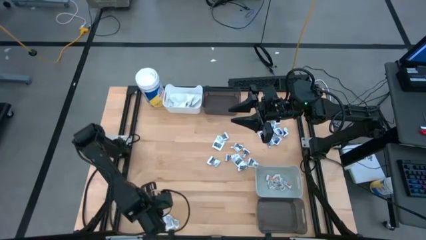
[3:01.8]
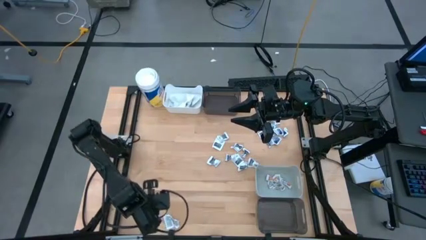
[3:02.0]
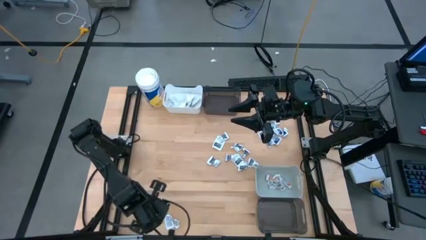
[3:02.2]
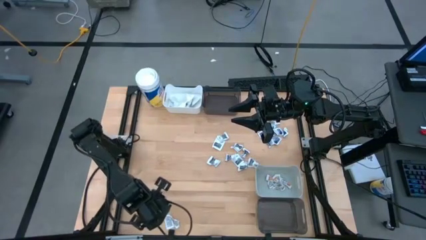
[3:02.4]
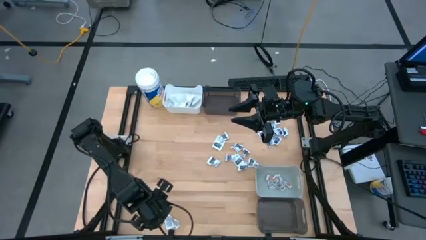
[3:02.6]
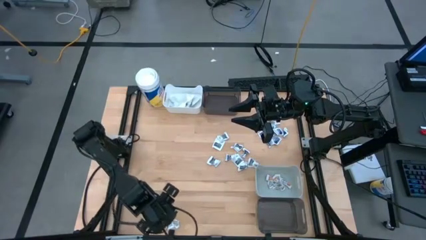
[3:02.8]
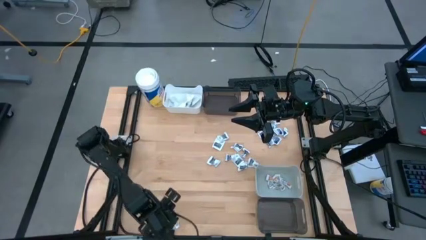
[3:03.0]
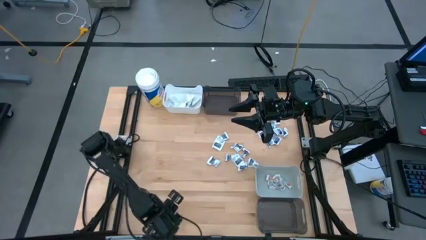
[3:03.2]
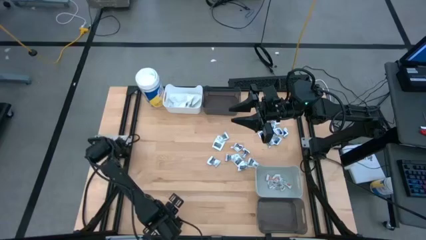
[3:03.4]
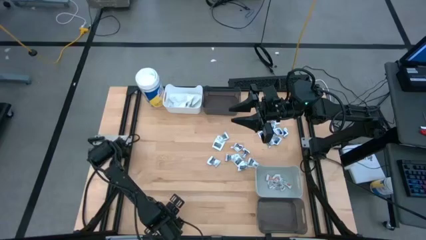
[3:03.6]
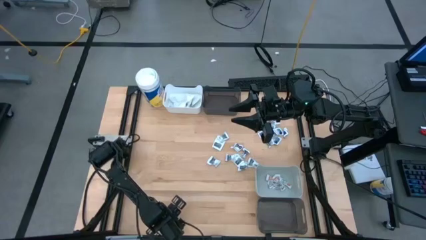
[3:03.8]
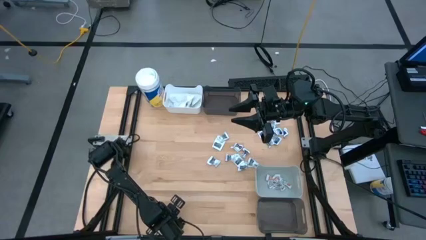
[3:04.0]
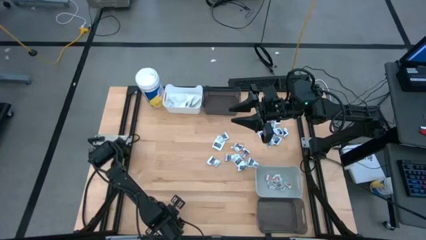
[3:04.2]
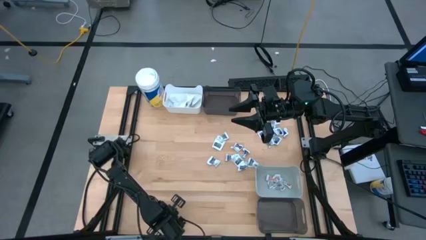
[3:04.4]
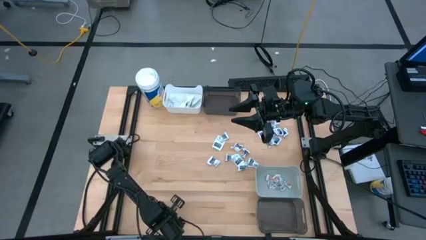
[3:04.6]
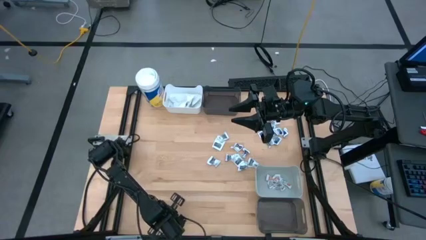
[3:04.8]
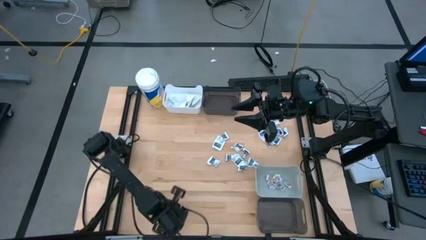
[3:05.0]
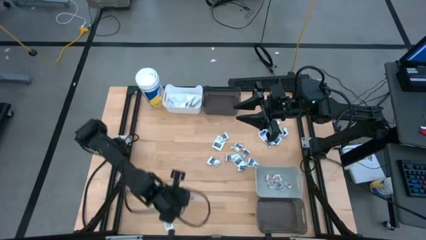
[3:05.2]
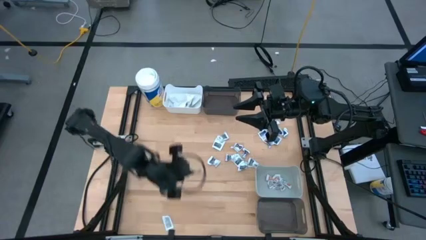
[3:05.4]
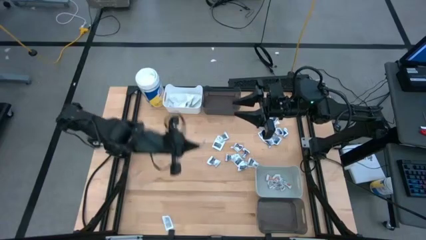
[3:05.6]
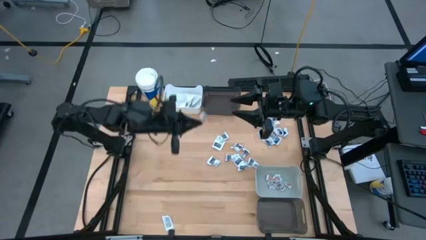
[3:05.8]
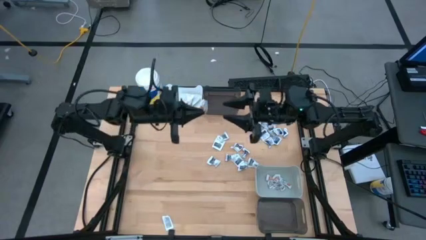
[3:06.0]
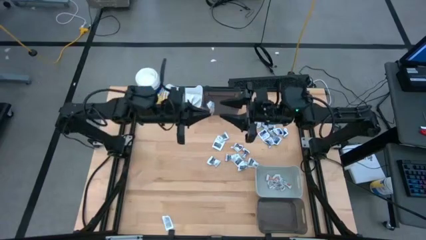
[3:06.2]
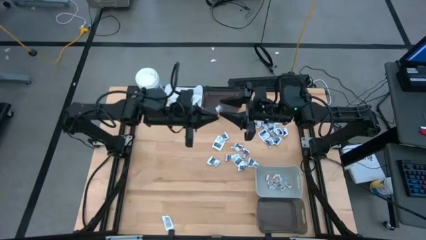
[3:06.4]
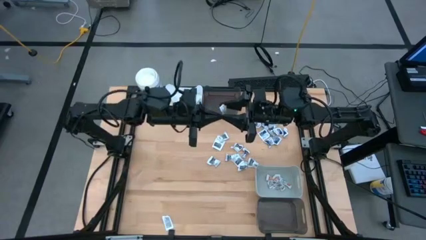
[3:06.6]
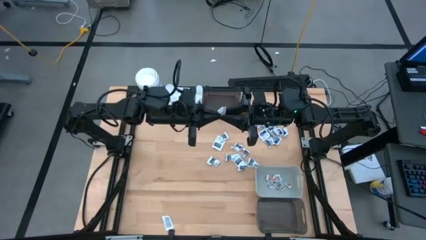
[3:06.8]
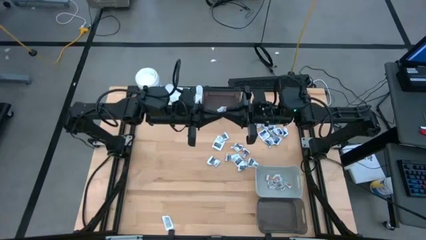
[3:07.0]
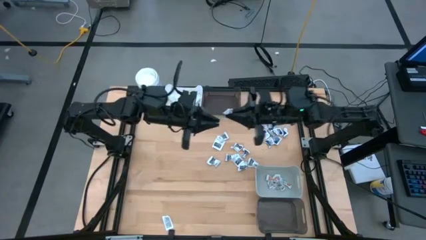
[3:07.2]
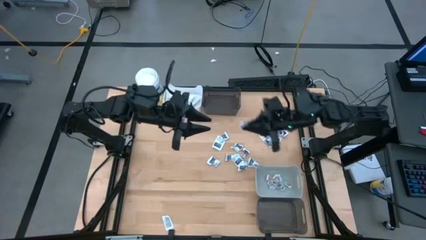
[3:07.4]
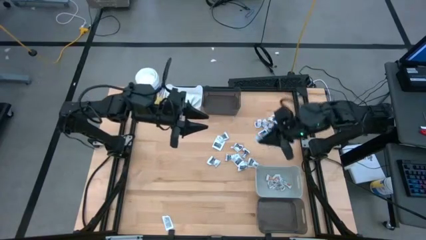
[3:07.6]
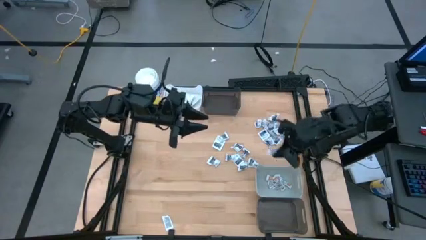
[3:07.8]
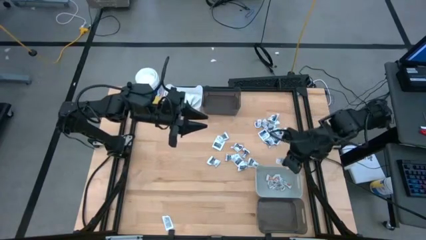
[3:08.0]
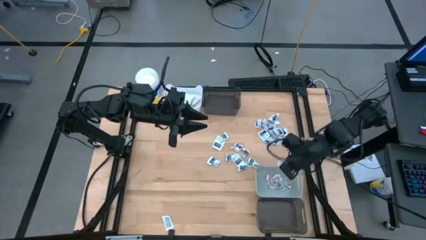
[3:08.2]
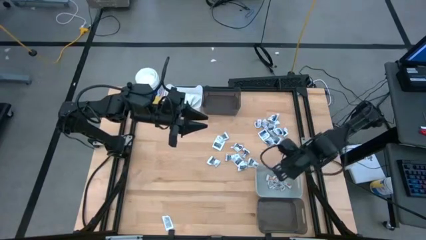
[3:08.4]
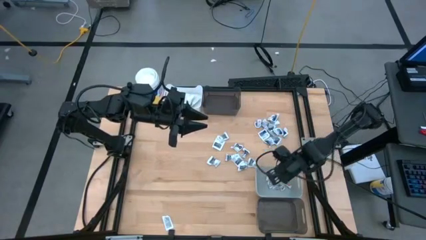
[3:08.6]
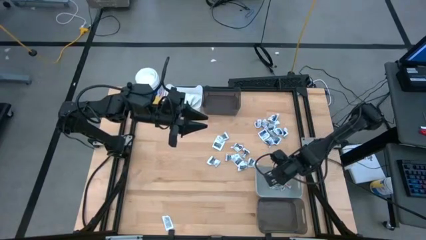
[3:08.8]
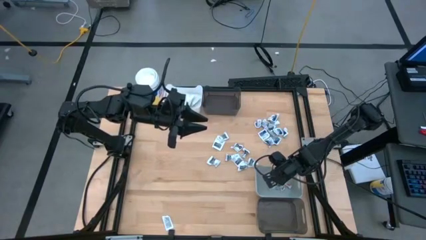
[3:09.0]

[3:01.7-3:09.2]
Task: Pick & Place First Aid Supplies
Put the orange ointment pack into the gray bin

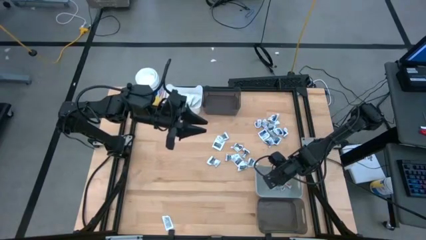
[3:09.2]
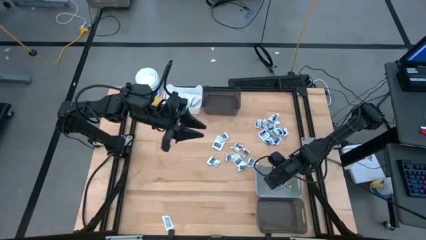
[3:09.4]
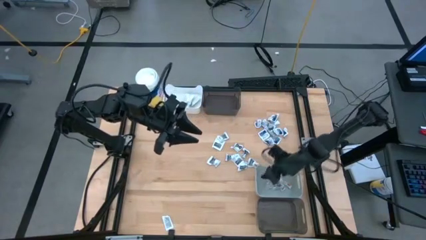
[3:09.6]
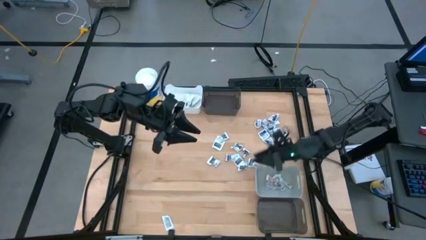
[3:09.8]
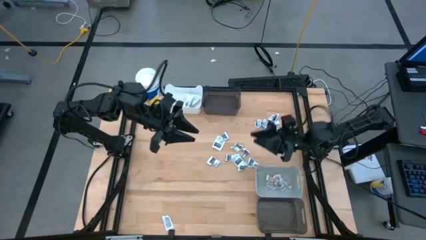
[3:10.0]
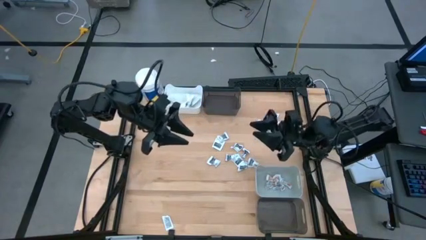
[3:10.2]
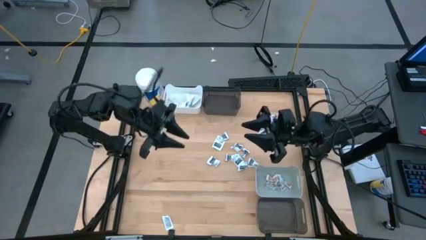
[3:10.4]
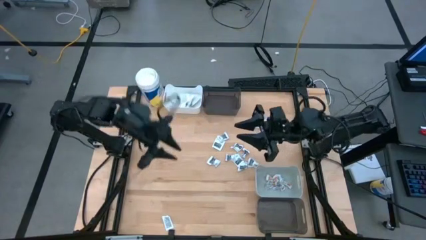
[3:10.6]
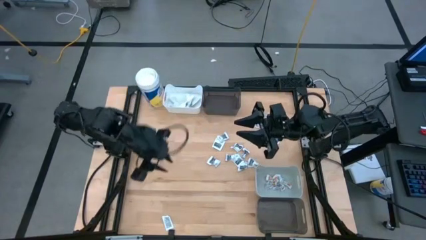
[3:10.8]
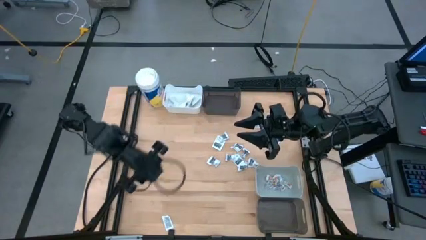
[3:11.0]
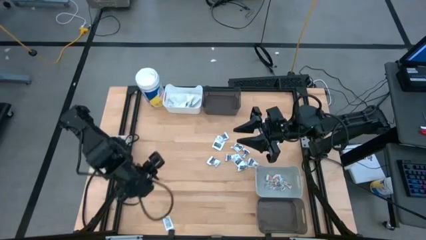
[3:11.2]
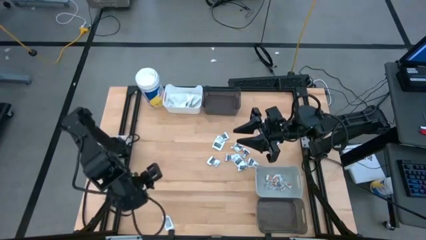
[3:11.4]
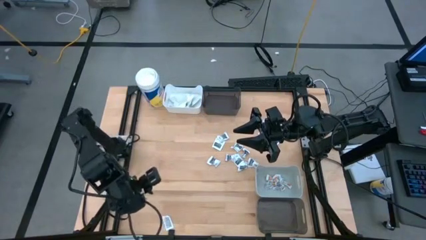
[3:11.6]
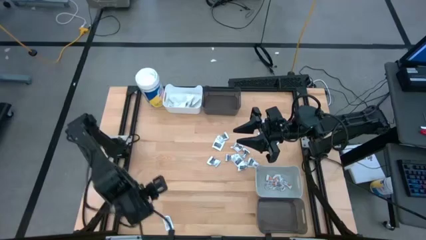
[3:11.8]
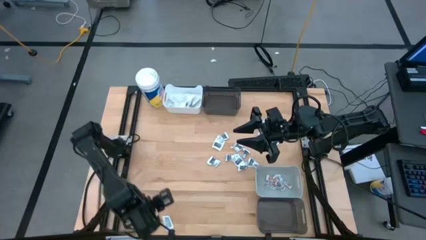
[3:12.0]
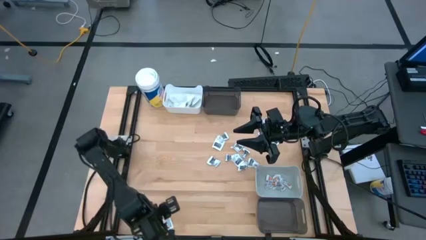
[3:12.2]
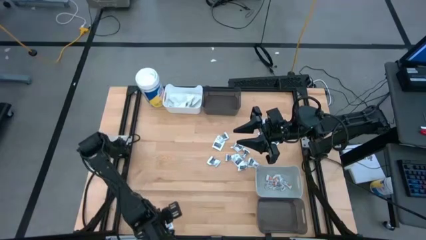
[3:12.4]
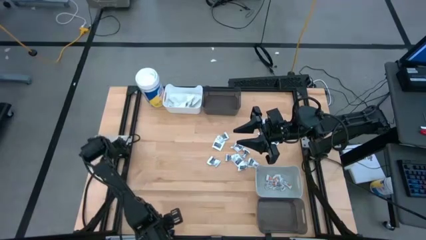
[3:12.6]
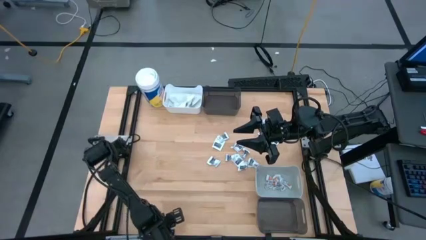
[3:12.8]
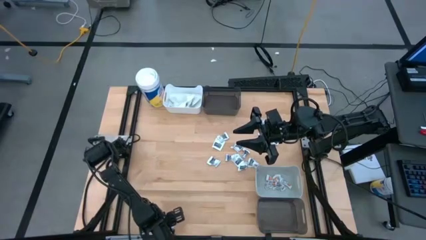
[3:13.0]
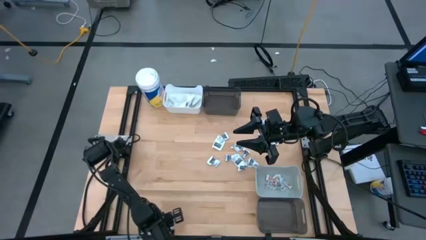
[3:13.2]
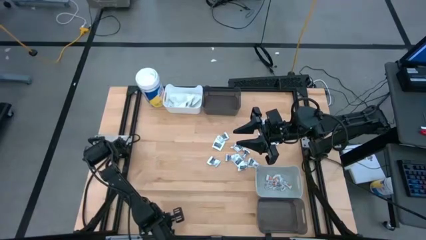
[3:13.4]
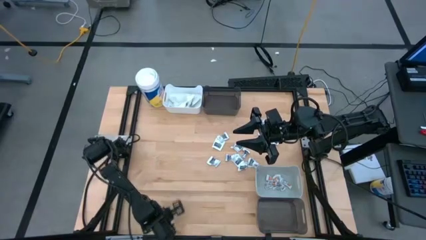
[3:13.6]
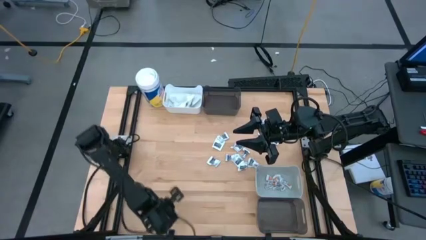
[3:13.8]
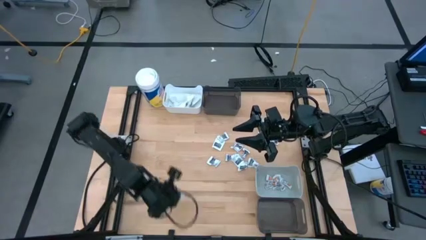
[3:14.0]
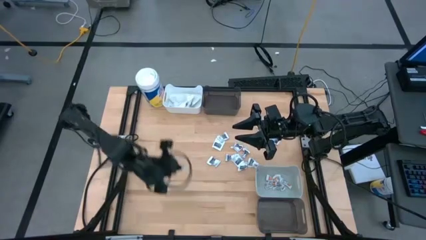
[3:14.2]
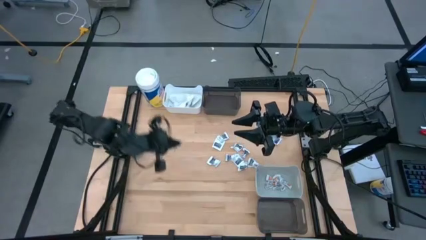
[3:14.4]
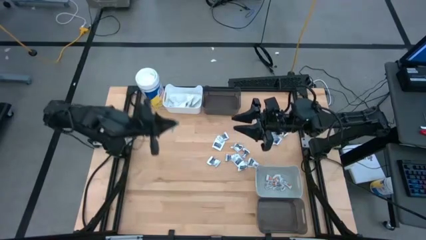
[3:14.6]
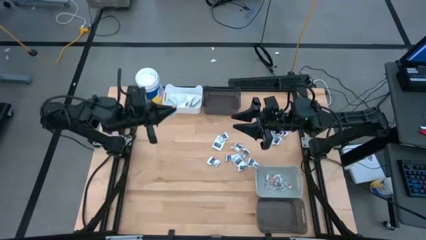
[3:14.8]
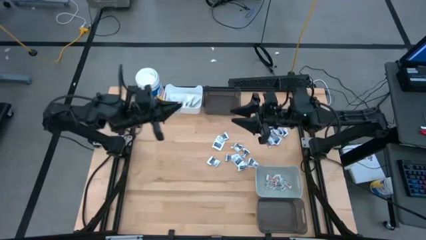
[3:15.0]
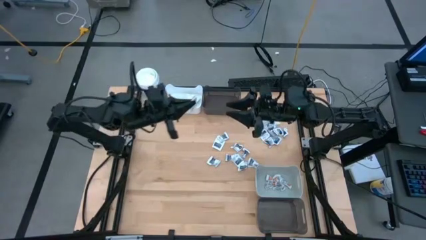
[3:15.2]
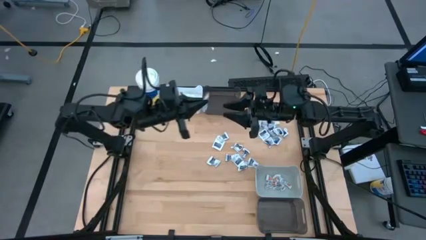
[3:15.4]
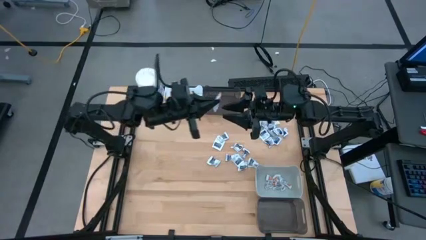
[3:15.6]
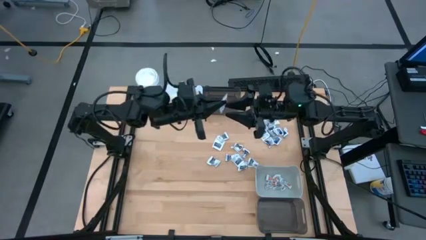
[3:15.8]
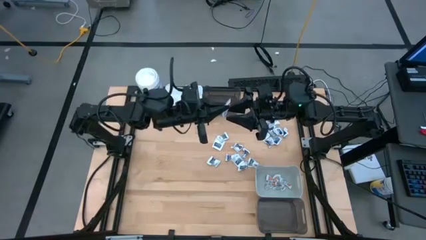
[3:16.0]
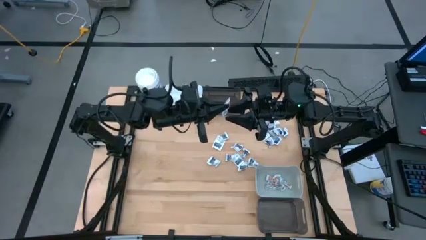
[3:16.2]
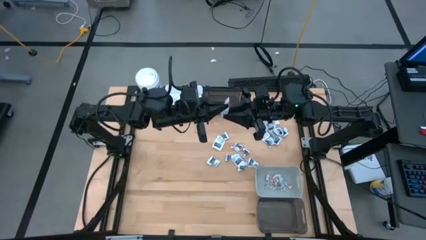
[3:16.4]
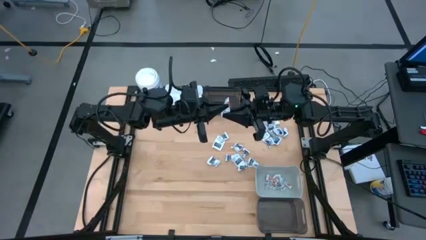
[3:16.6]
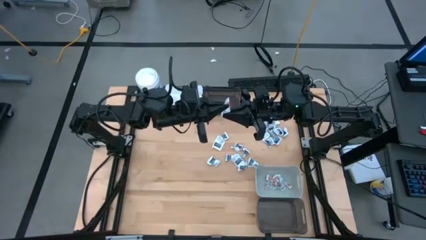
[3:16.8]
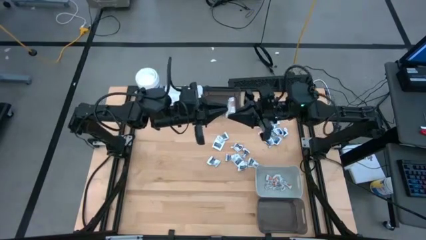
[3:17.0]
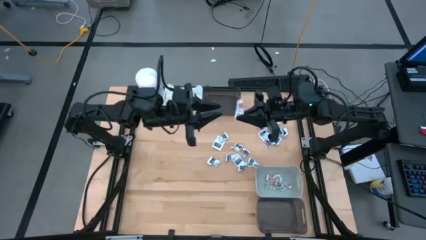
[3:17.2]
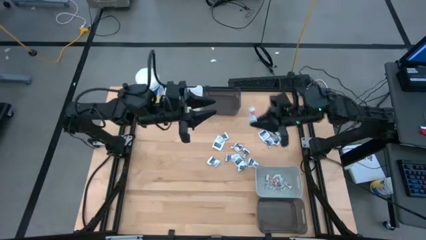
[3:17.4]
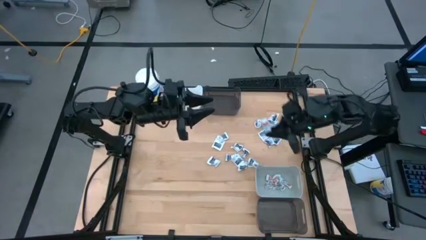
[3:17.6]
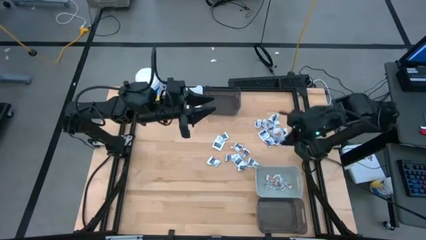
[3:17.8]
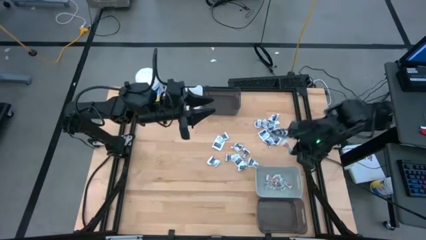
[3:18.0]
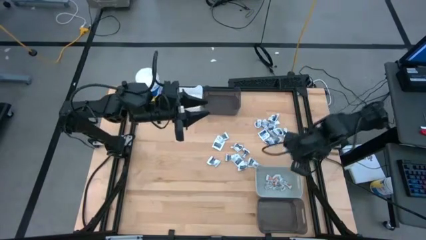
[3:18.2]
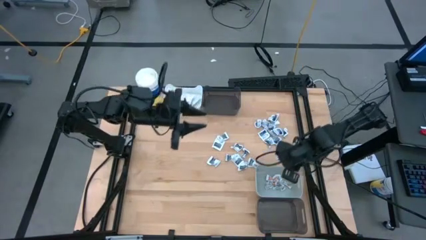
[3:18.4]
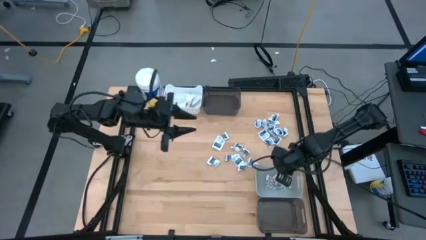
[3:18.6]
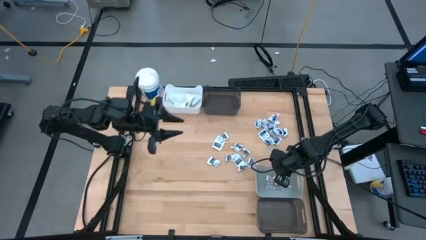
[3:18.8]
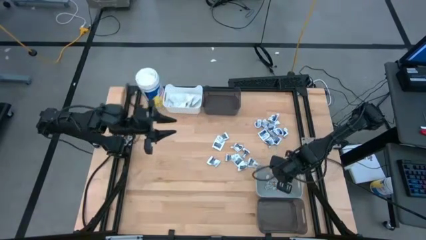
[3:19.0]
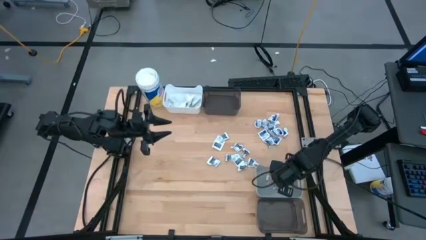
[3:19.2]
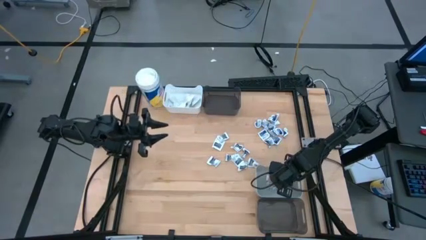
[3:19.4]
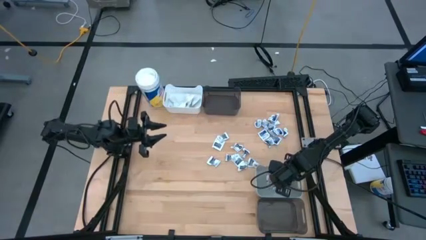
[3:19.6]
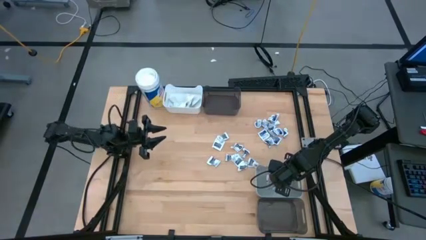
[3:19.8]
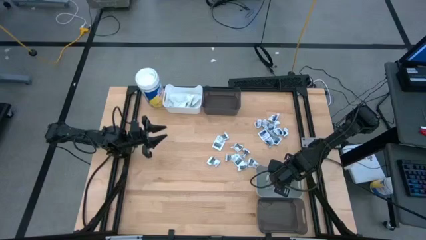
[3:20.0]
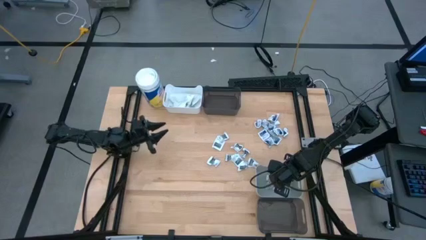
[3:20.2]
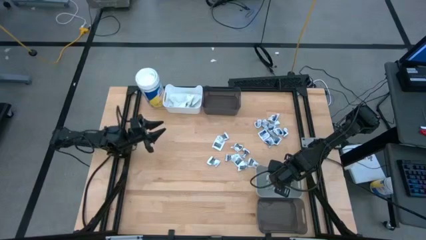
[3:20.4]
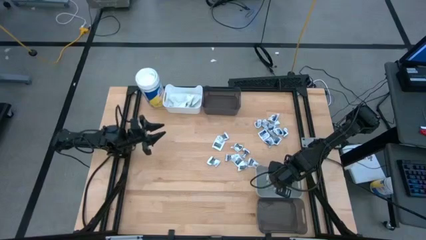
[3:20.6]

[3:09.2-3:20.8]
Put the orange ointment pack into the gray bin
